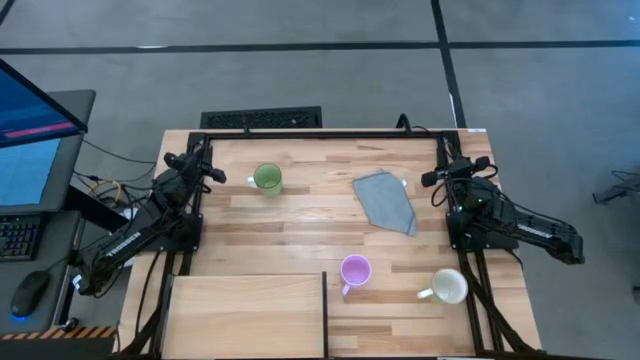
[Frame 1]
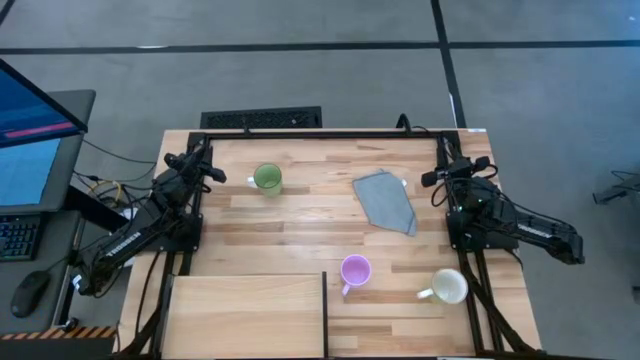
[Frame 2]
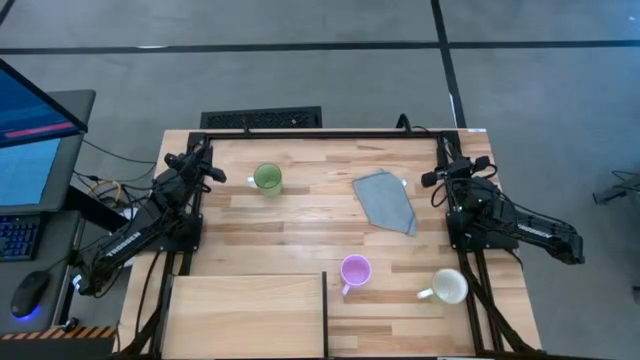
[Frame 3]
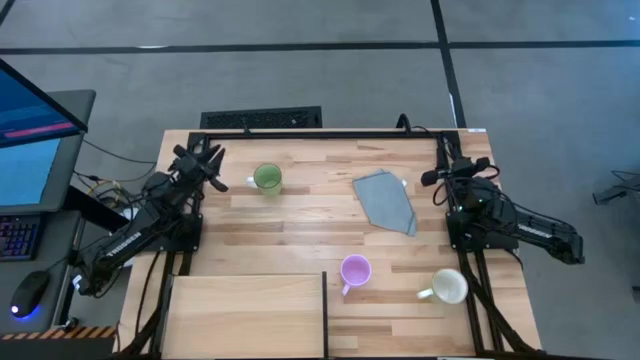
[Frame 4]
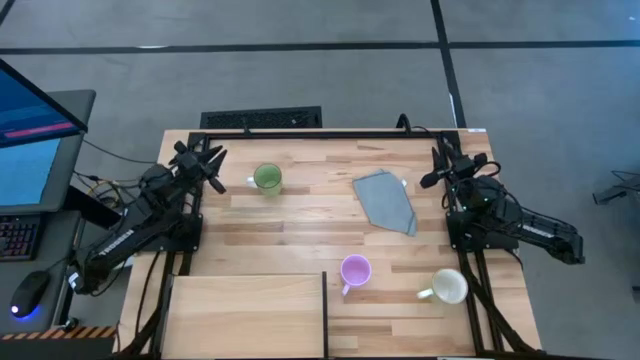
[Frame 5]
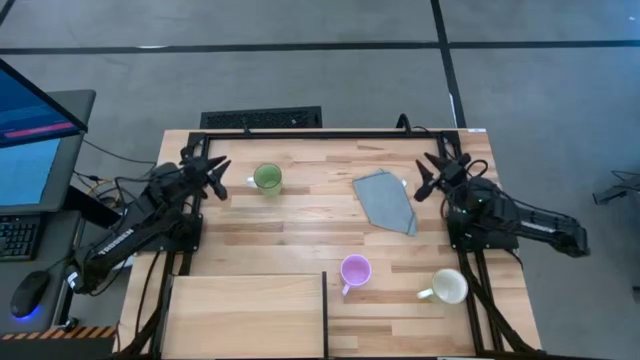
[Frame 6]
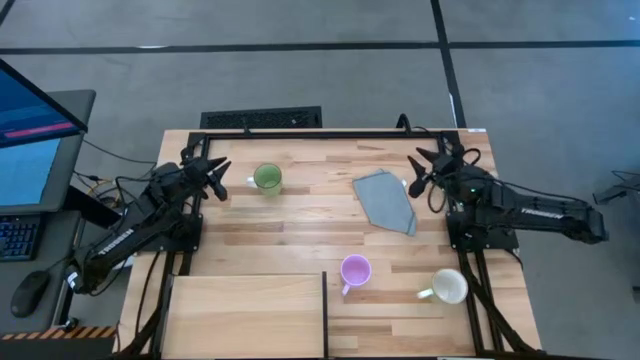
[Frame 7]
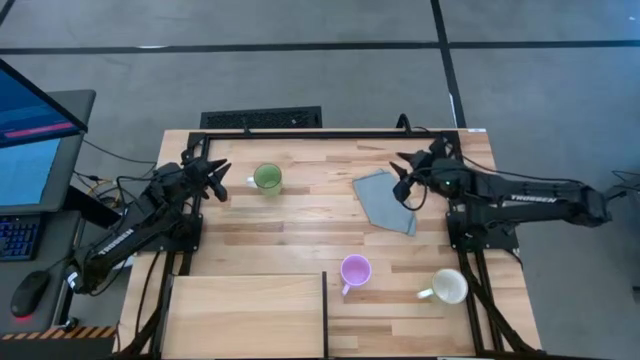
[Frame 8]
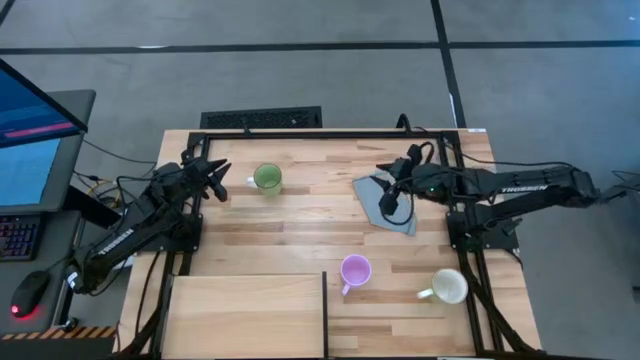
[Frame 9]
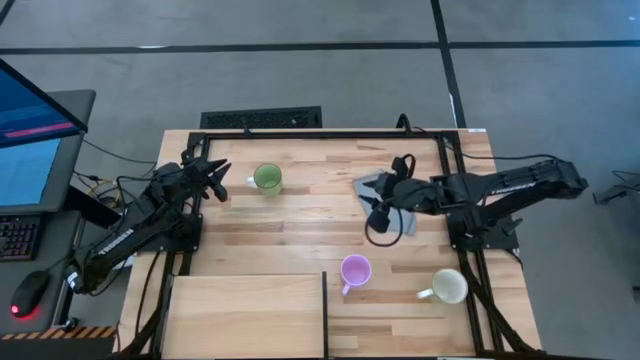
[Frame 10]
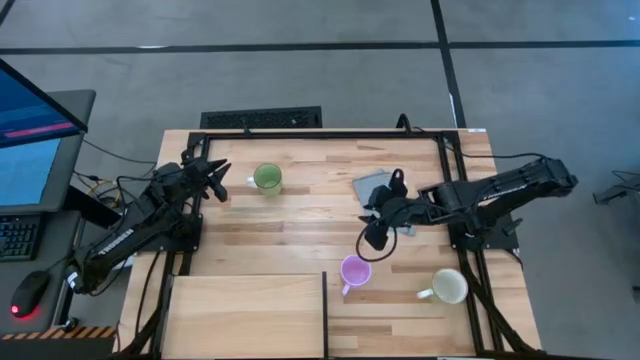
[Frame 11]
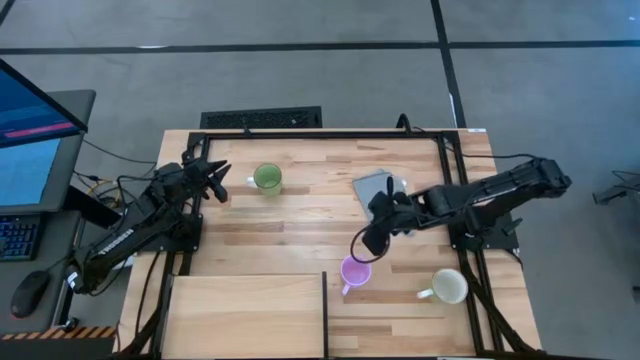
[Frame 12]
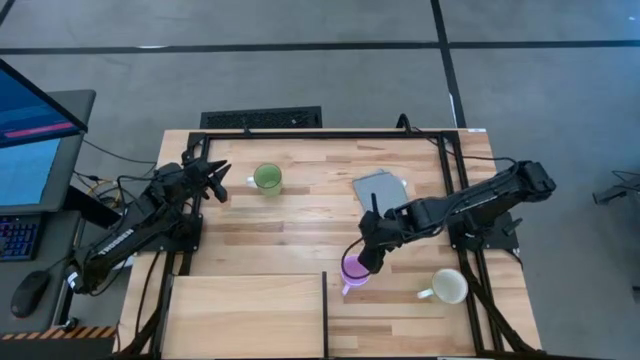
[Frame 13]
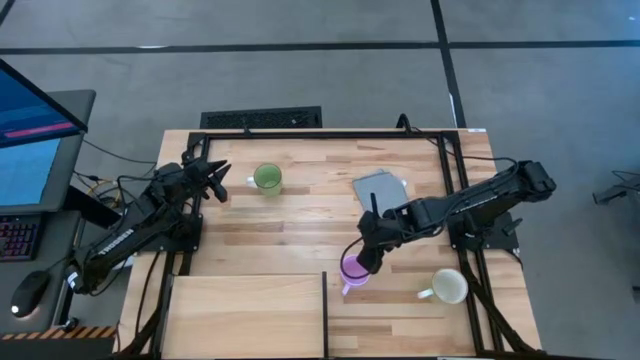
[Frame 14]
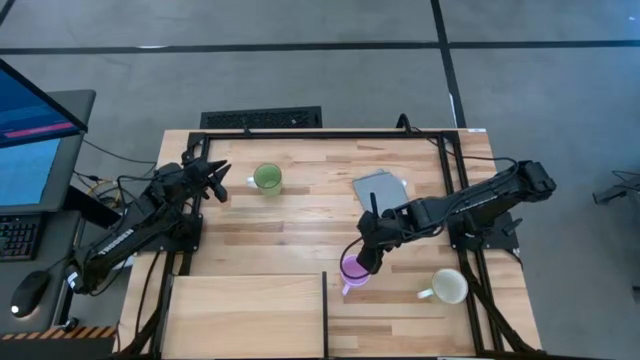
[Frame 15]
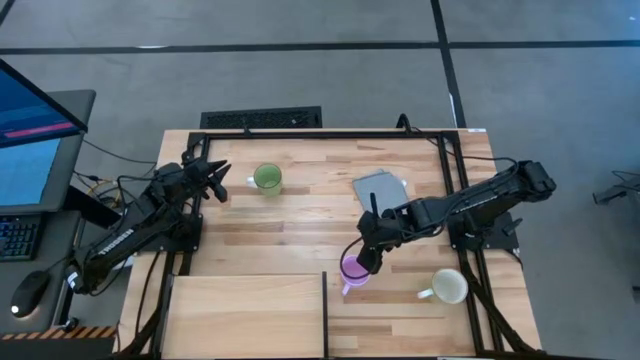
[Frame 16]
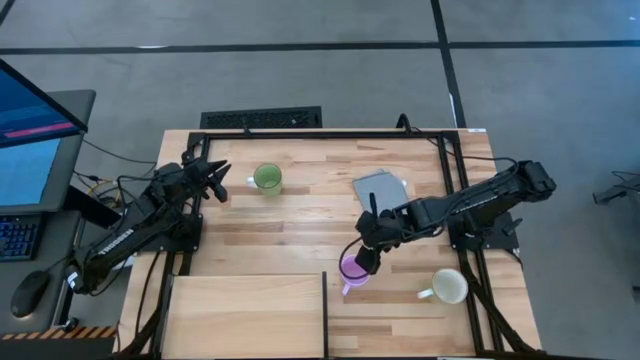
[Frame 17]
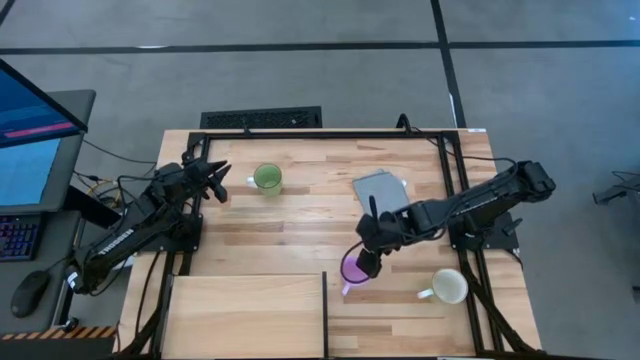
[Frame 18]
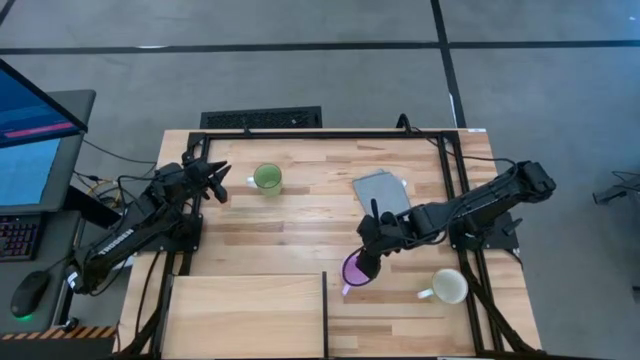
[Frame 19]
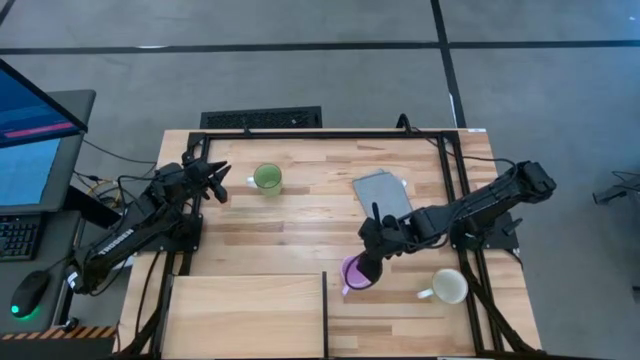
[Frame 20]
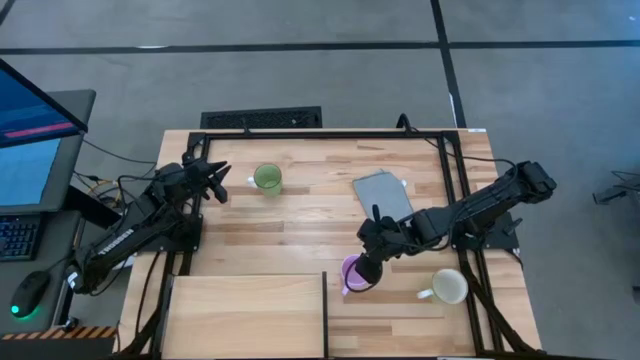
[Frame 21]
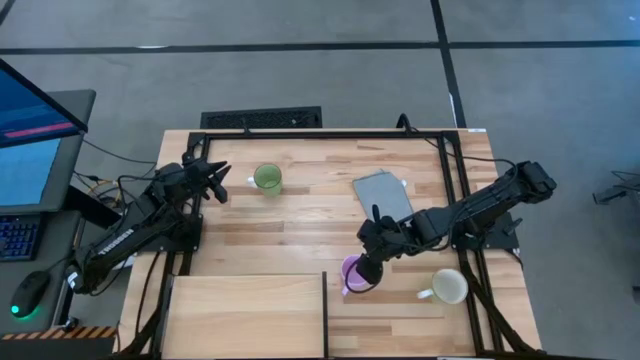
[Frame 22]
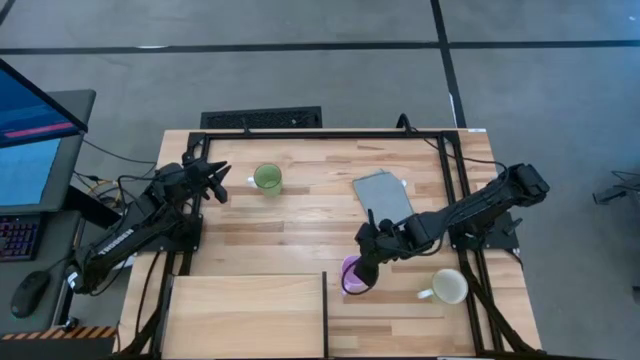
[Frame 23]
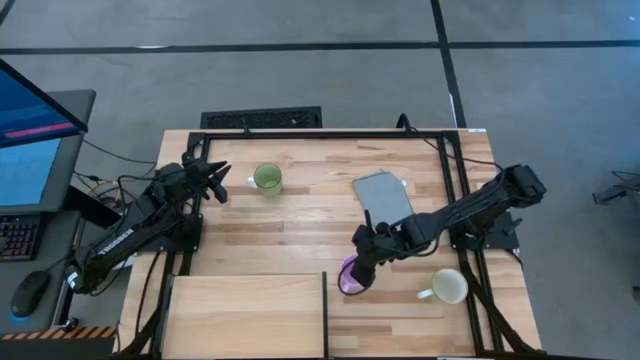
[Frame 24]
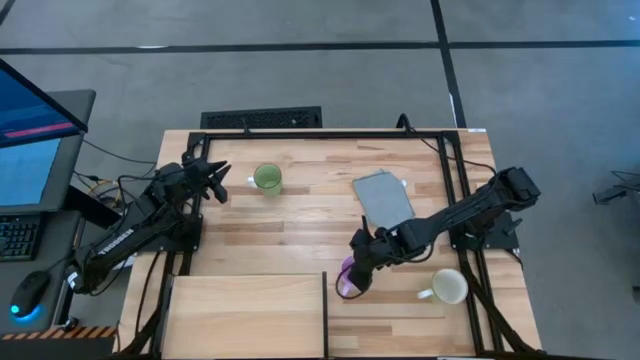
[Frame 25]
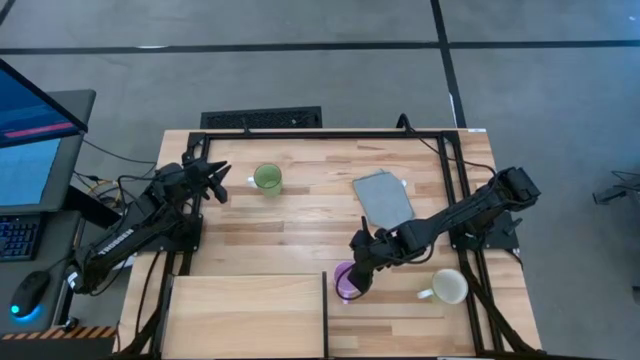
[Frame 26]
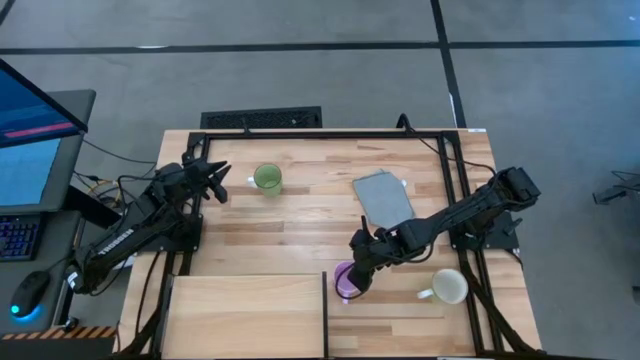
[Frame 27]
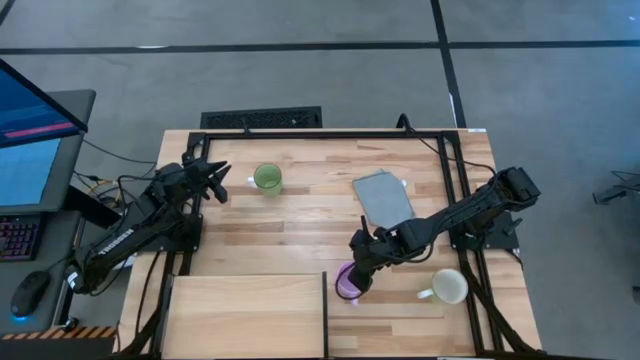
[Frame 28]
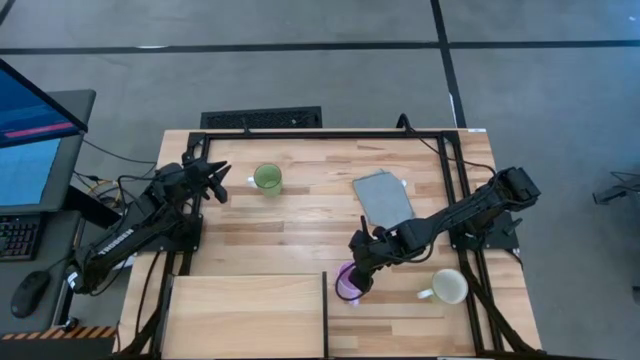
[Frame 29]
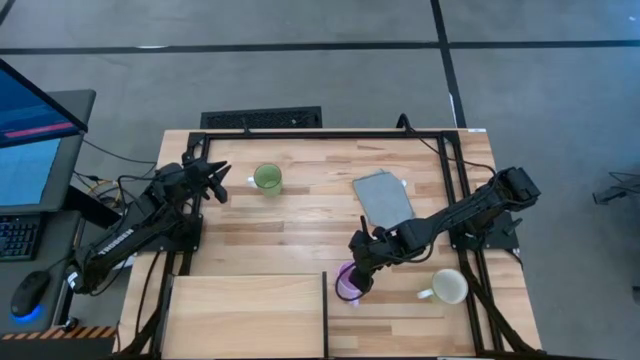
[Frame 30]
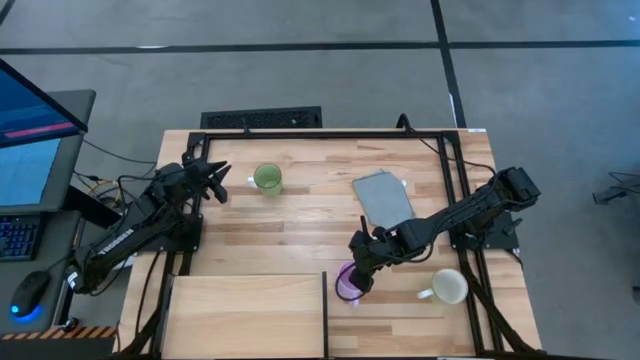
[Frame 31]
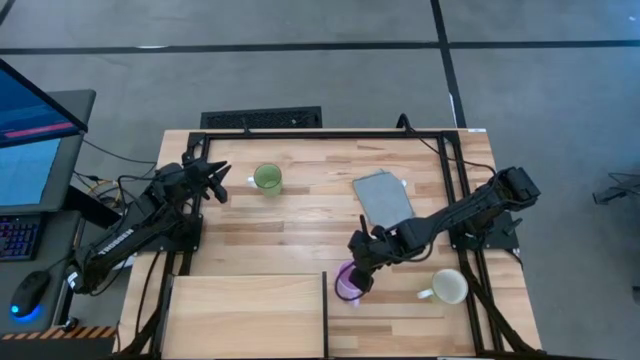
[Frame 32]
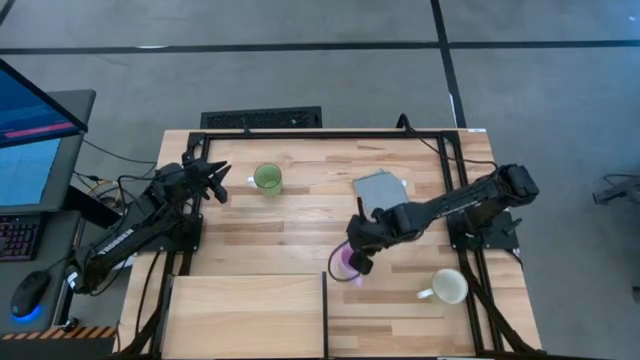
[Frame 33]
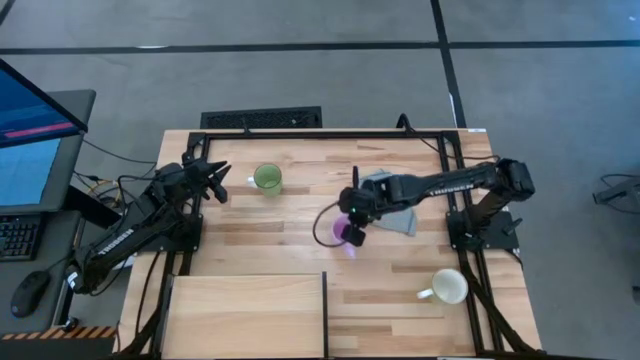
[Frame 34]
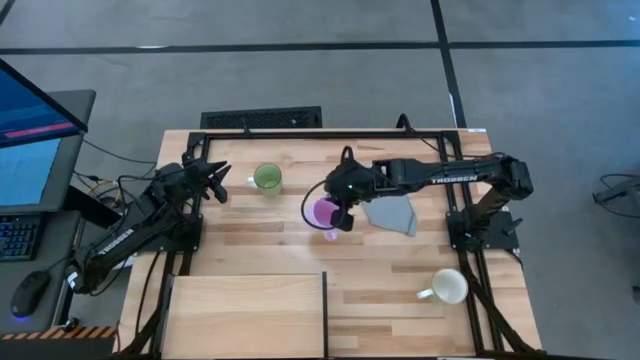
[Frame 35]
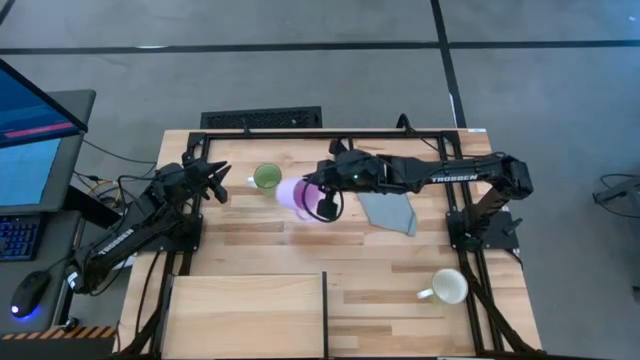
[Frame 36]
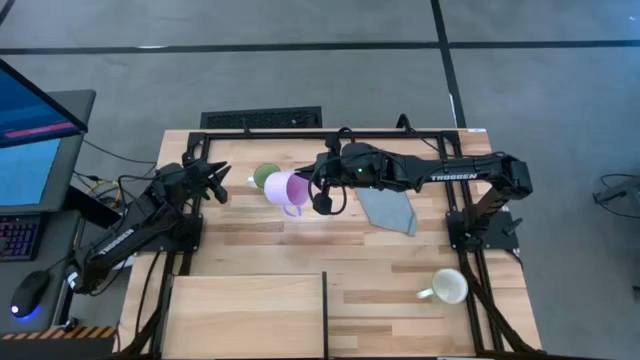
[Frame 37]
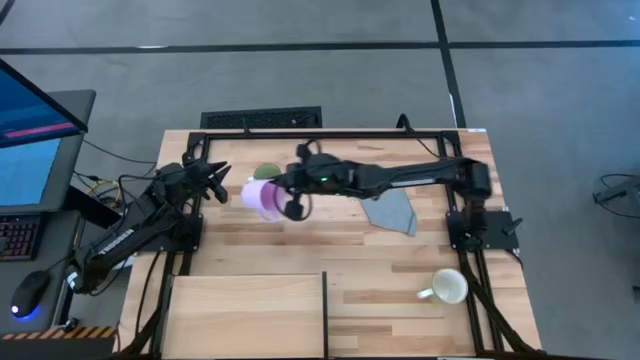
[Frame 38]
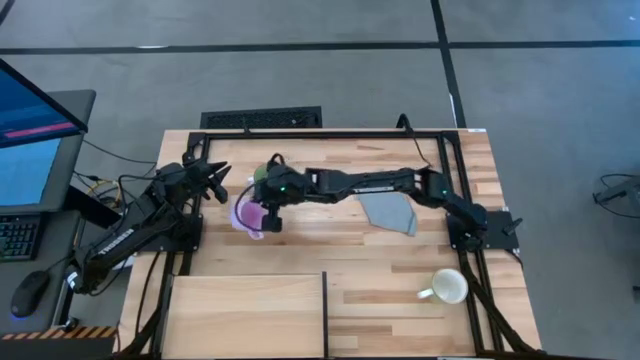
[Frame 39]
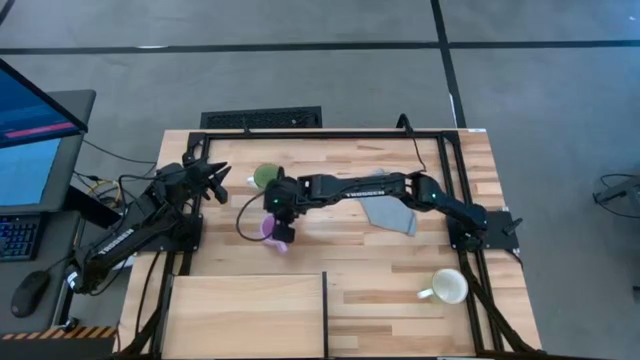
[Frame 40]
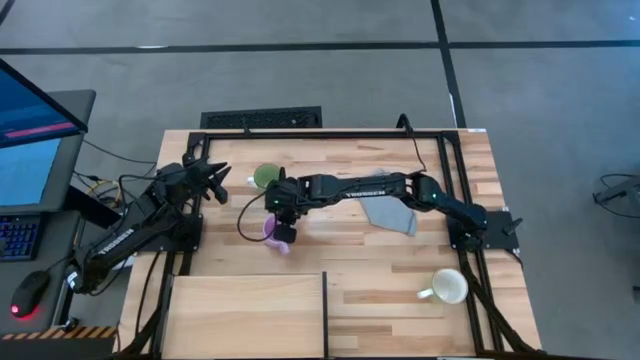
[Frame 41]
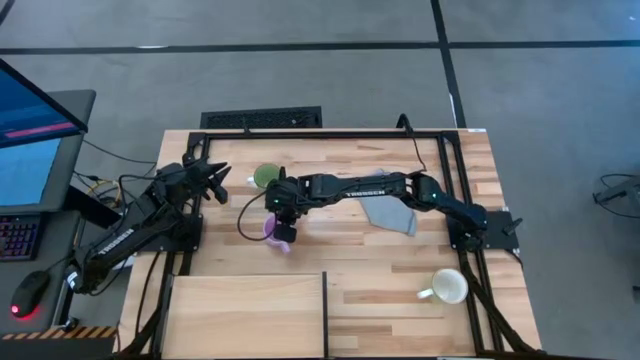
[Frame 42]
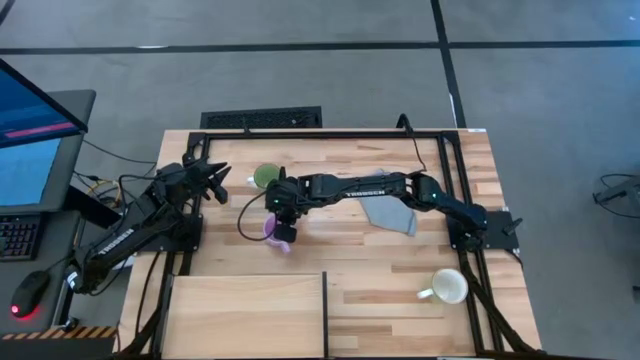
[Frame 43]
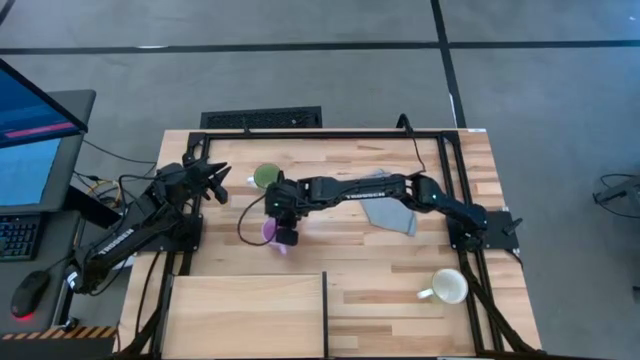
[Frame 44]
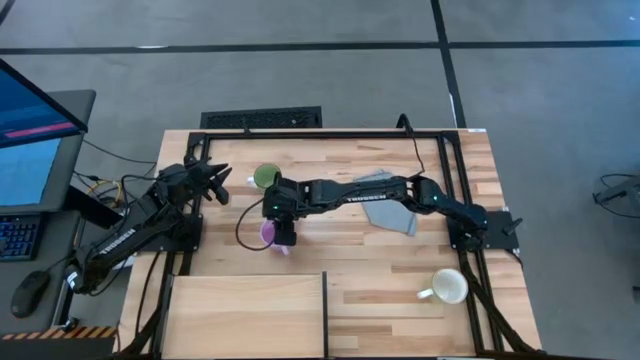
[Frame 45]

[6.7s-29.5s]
Task: Stack small to large cups/mugs on shelf
Put the purple mug on the shelf
